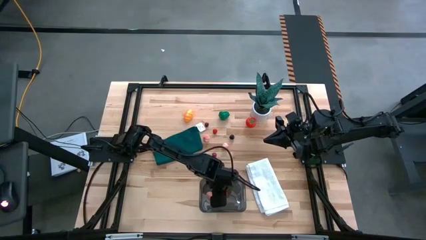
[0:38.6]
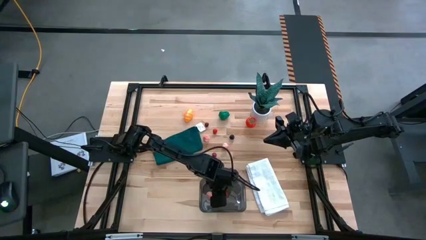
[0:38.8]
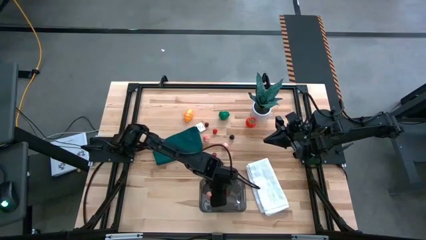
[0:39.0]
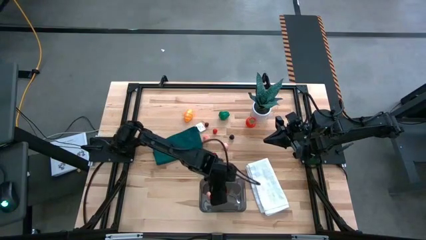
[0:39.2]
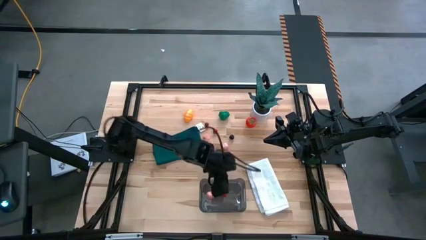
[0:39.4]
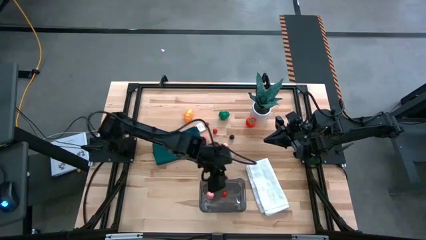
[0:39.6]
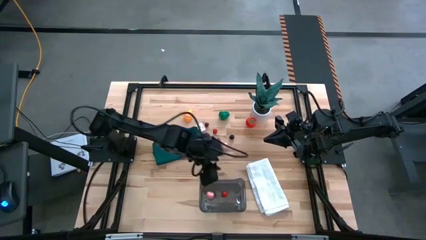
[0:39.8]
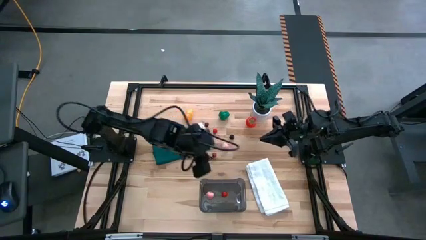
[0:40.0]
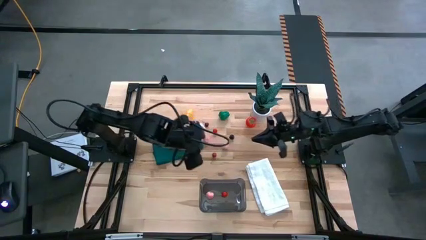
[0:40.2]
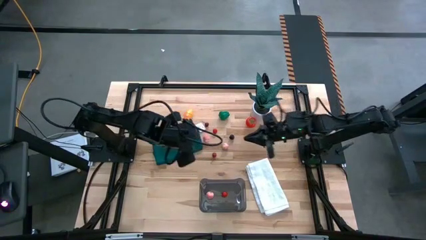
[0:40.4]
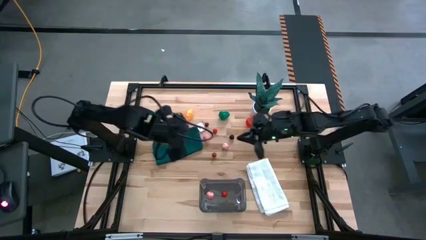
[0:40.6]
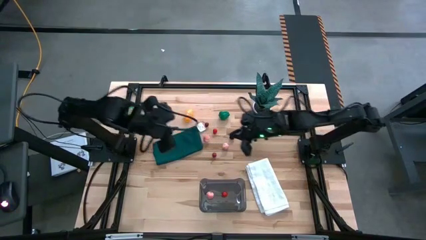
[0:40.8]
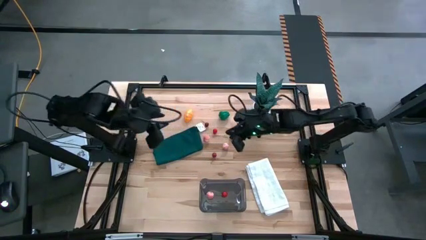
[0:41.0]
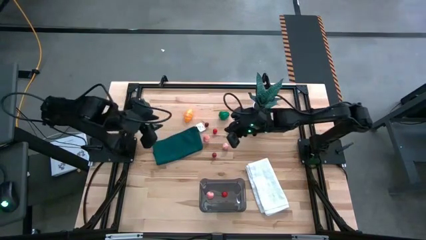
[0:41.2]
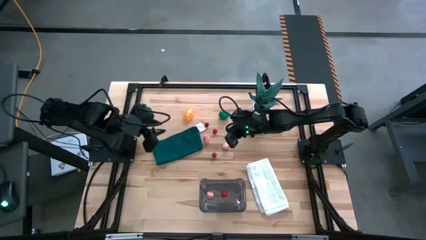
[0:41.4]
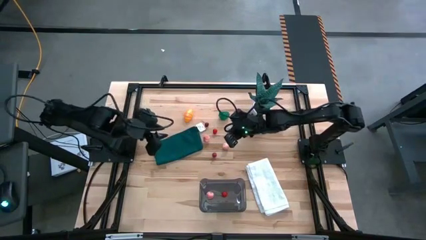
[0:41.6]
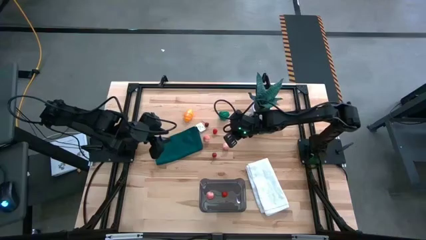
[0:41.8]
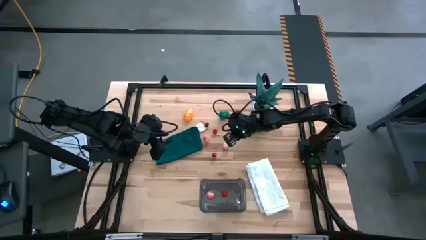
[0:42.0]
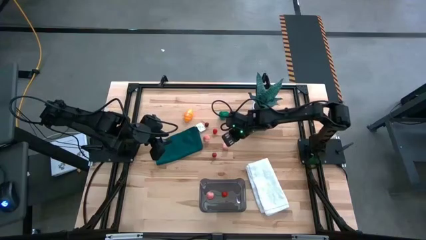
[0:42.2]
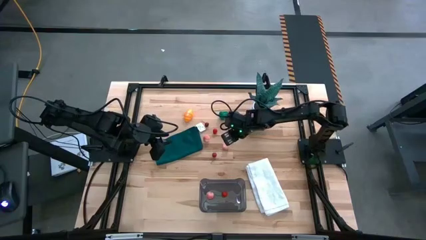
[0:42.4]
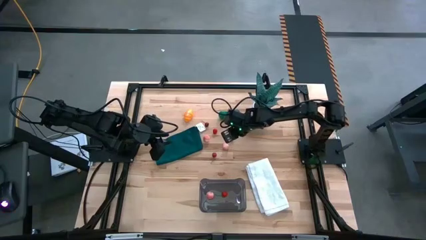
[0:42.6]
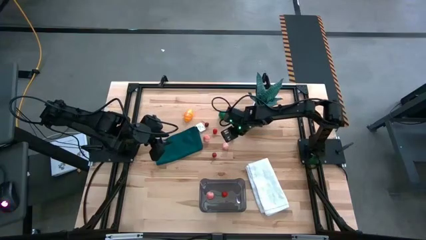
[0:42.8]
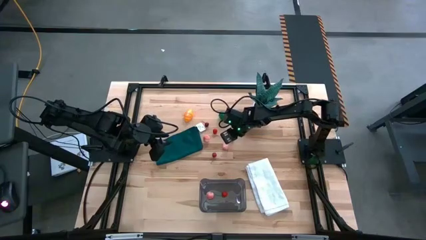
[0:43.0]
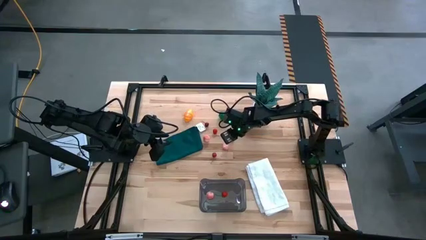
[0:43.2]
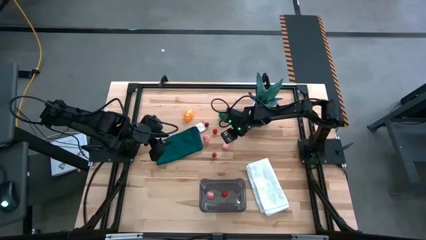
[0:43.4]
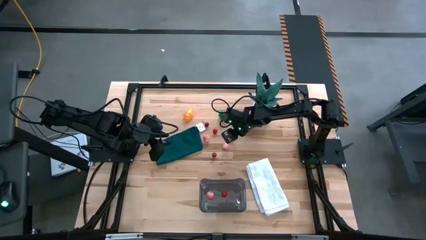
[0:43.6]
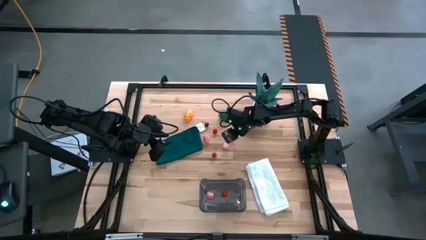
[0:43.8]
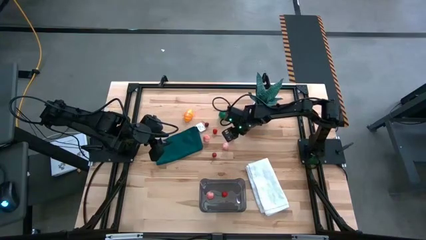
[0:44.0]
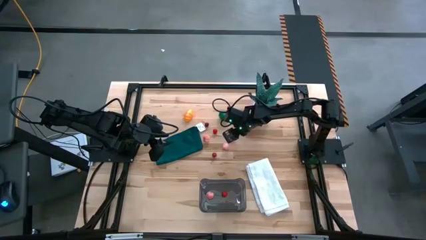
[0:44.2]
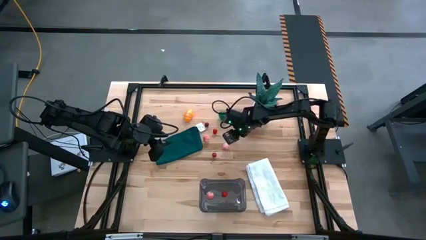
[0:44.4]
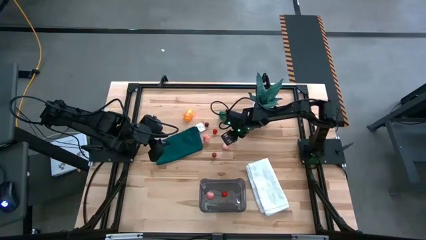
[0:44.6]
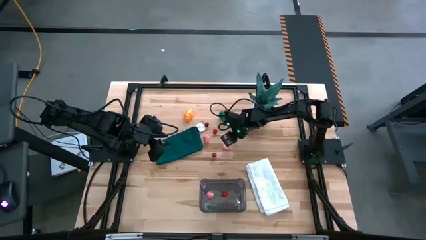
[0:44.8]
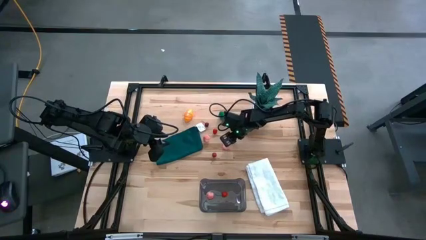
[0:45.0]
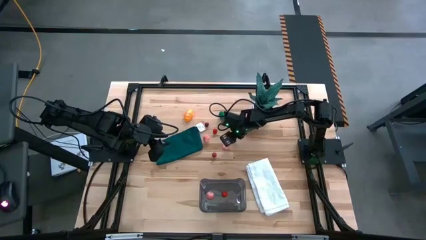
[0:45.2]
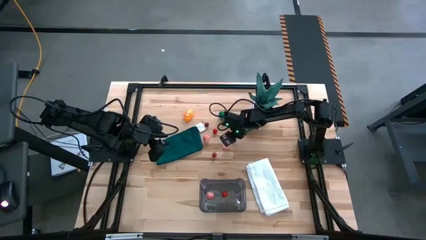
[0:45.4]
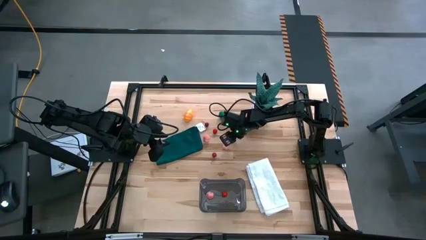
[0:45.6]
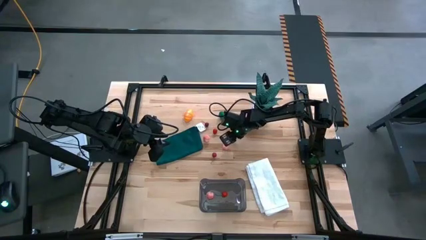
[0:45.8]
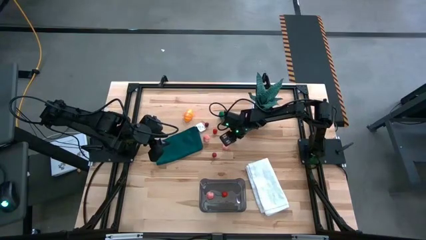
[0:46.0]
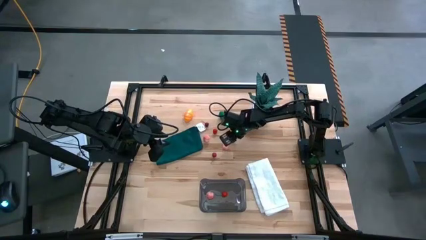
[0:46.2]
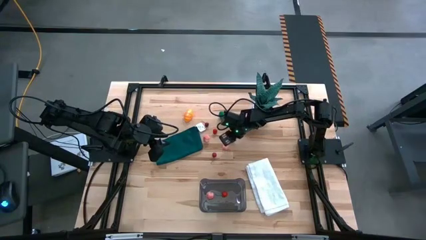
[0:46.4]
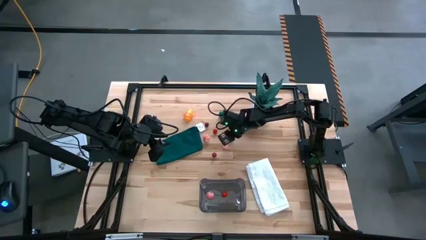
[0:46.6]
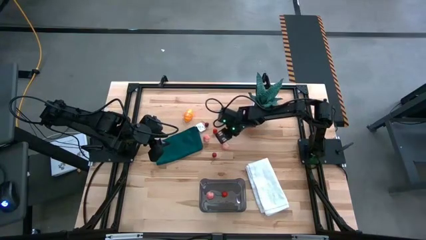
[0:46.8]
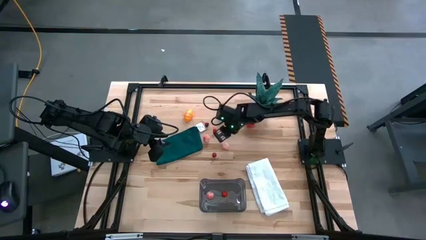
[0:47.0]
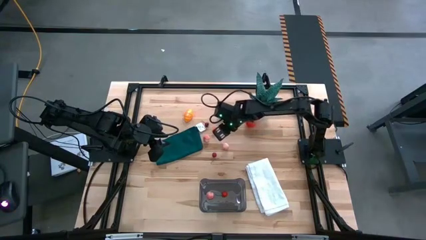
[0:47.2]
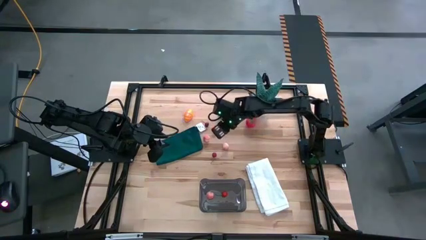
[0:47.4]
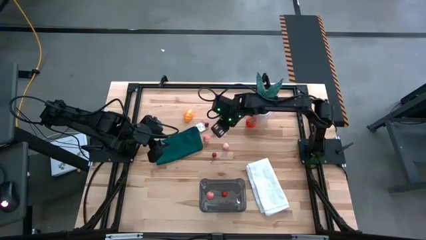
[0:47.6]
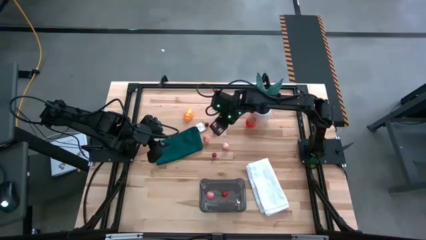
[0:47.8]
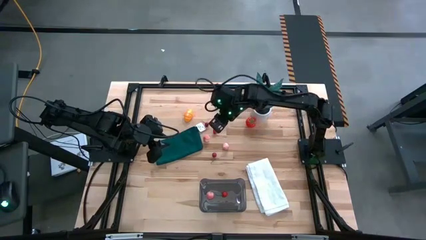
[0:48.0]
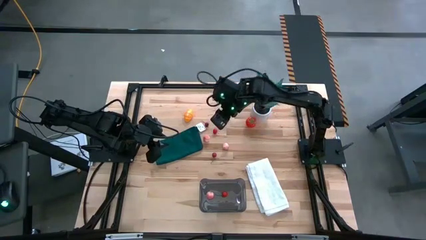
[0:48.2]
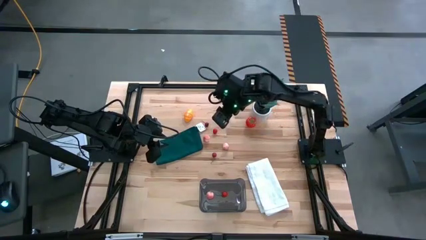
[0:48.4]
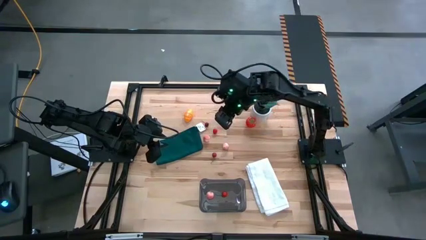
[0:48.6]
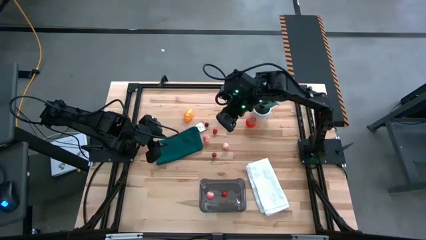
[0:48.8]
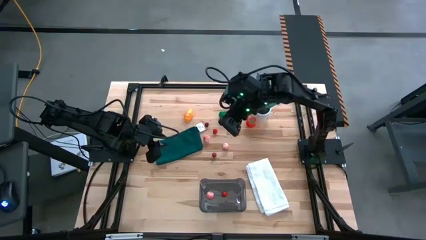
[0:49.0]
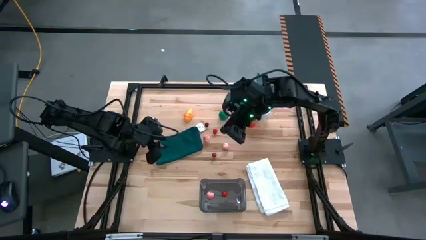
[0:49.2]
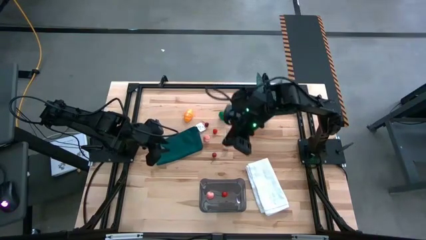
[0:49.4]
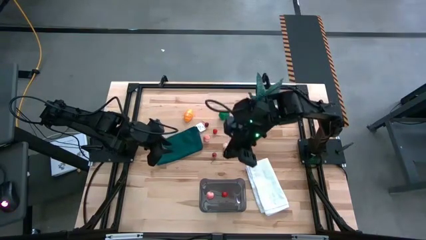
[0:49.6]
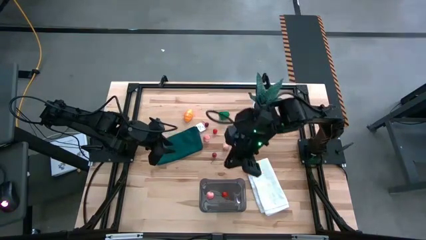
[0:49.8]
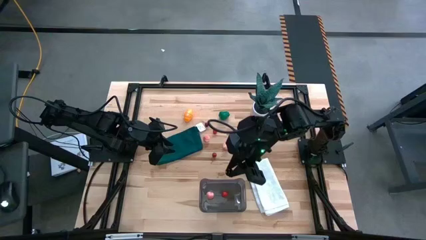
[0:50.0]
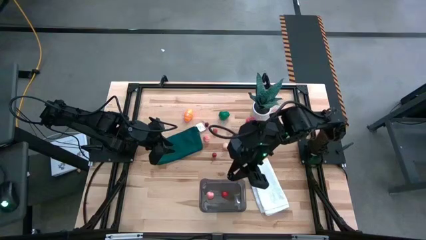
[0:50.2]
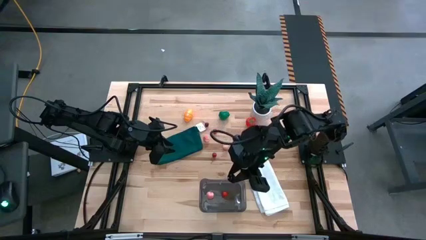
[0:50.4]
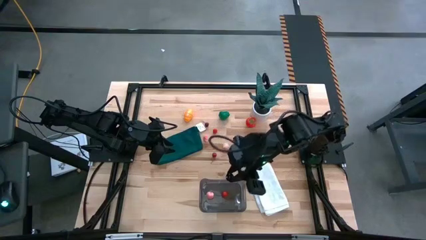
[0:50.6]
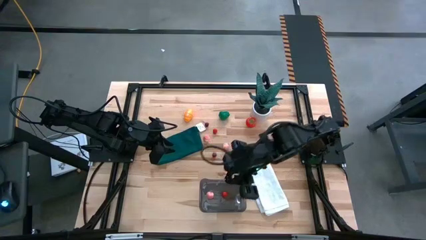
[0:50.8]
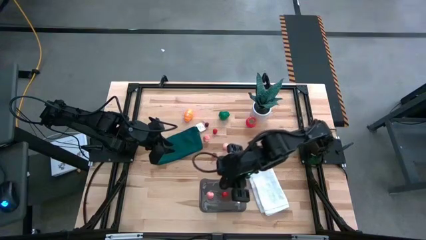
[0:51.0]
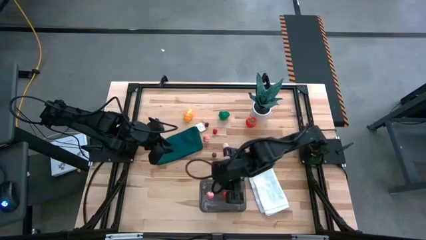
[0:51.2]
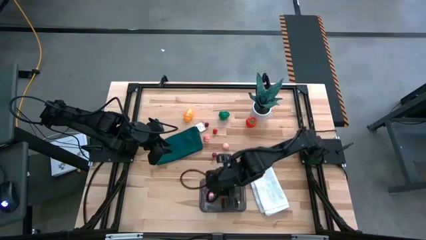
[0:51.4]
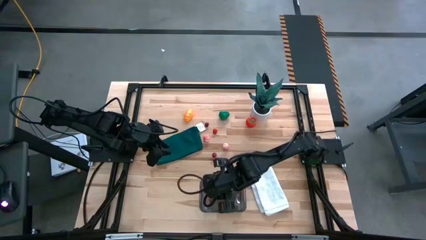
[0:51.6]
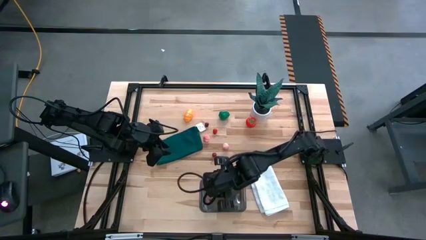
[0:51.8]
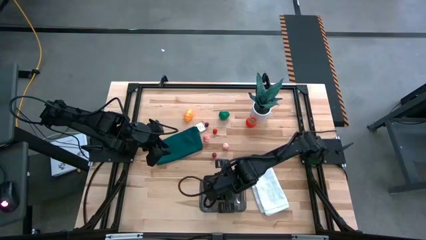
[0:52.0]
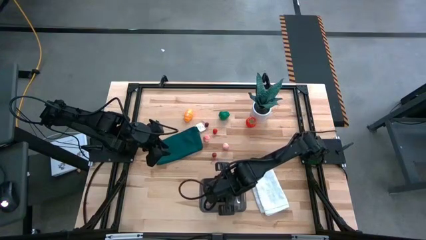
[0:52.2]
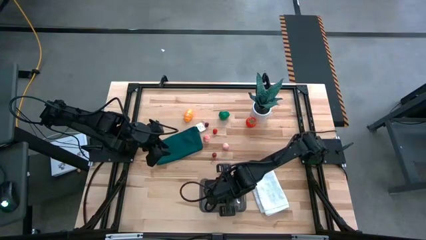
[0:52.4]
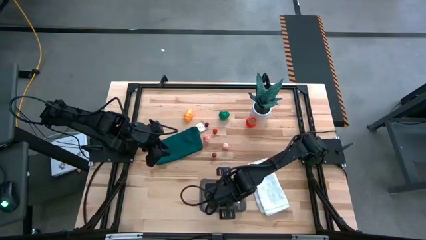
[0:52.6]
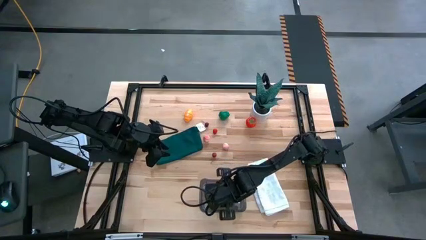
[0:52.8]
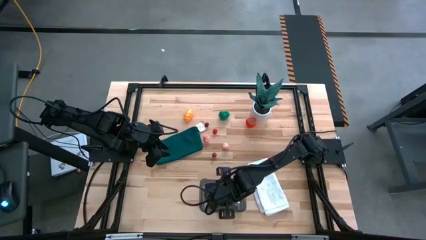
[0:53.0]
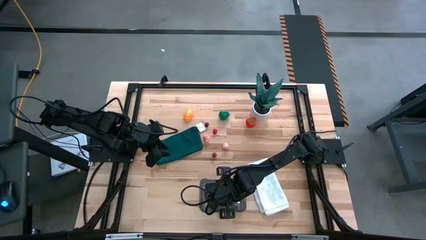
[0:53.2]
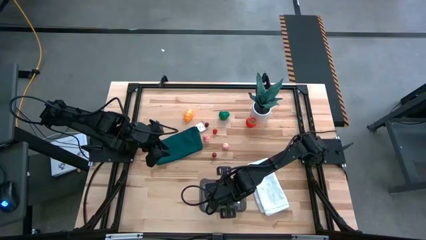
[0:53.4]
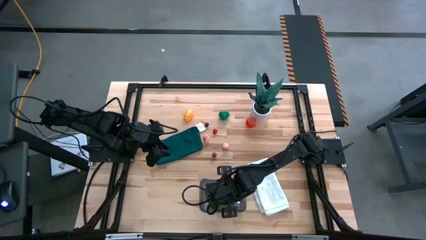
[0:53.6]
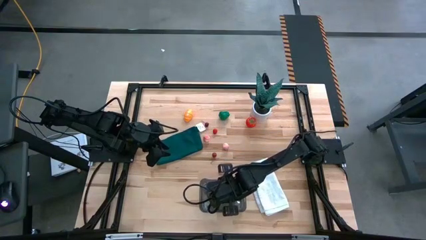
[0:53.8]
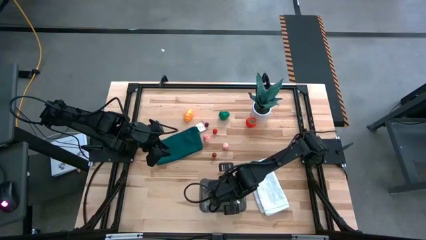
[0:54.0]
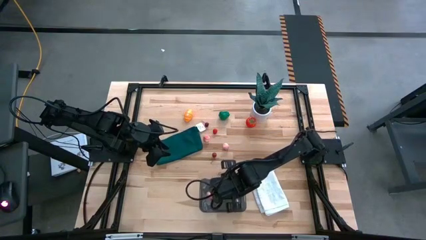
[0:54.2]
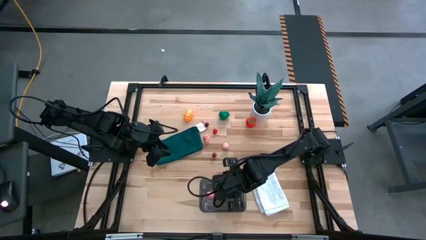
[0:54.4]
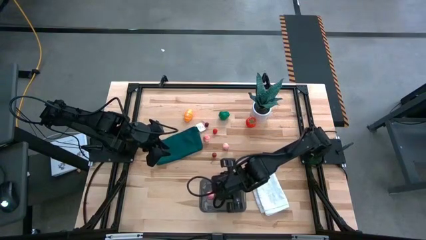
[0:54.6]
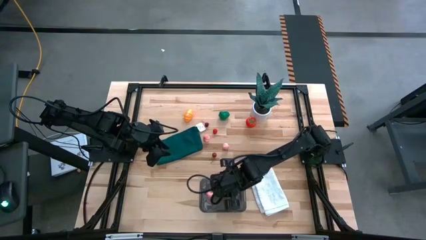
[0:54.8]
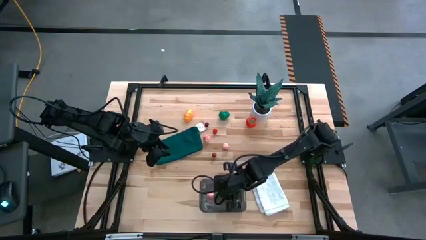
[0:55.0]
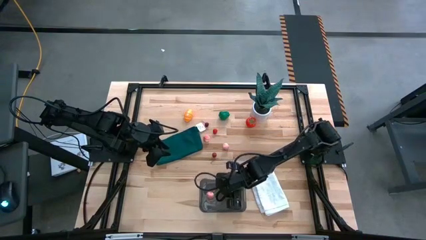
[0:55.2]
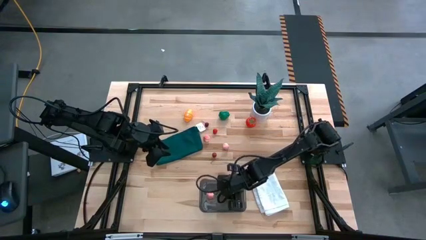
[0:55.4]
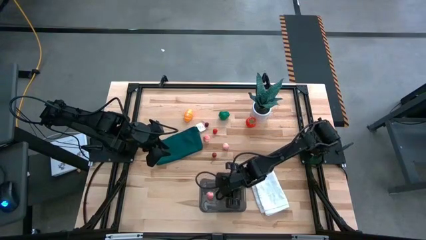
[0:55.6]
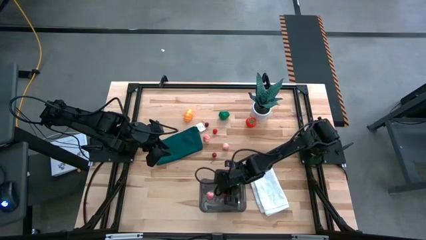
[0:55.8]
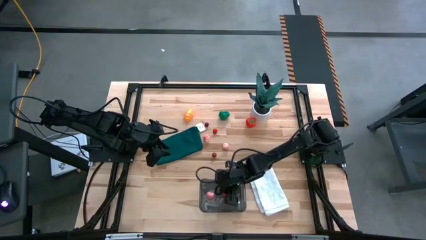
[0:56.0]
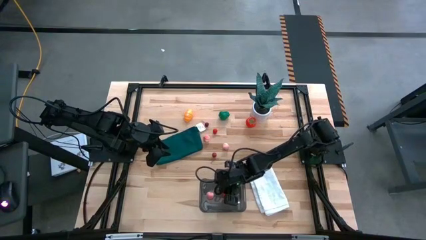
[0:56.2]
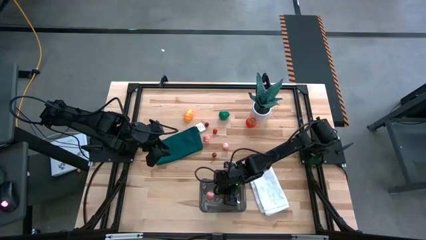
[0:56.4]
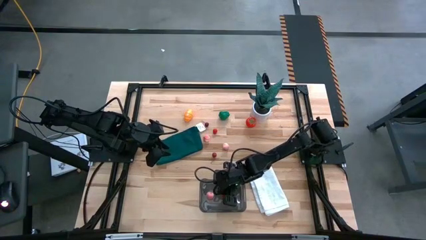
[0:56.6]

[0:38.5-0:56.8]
Task: Pick and placing Produce into tupperware
Put the black cherry into the black bin
